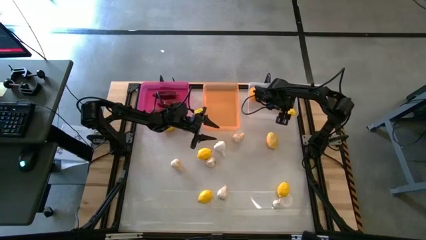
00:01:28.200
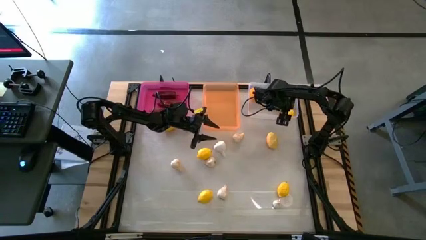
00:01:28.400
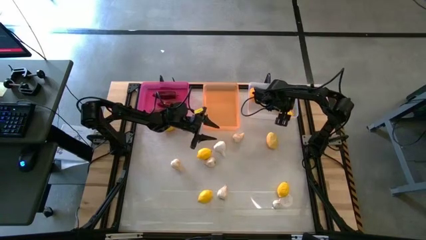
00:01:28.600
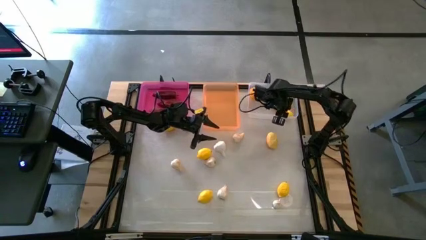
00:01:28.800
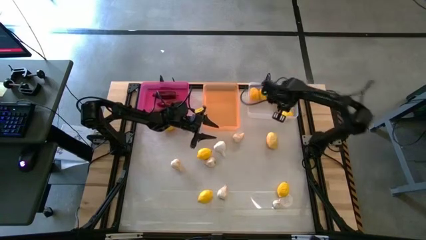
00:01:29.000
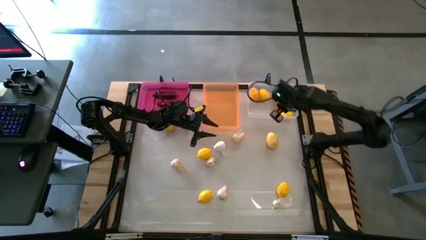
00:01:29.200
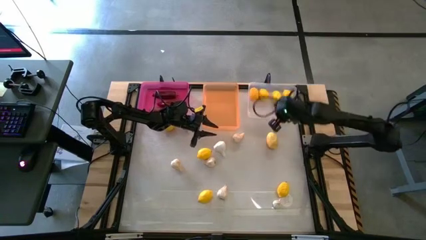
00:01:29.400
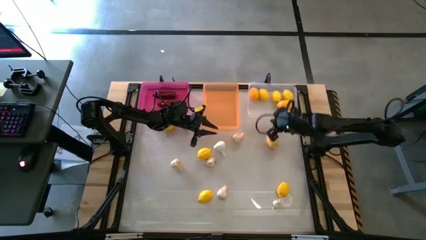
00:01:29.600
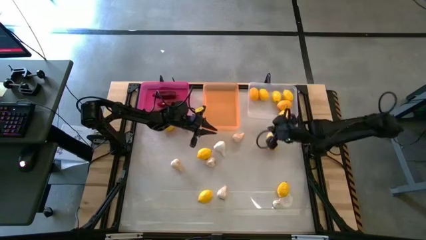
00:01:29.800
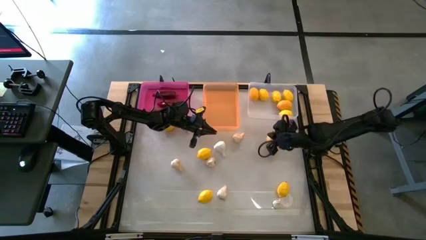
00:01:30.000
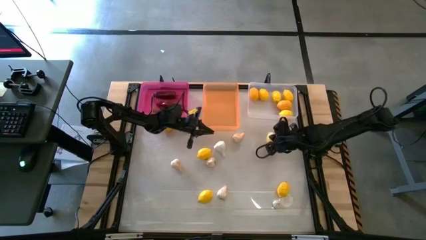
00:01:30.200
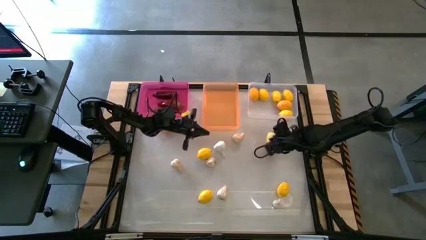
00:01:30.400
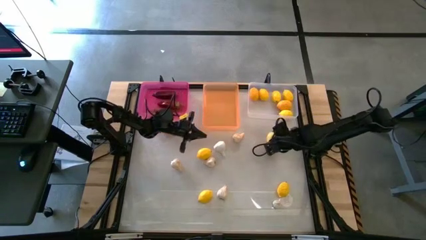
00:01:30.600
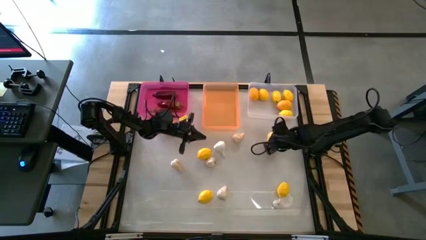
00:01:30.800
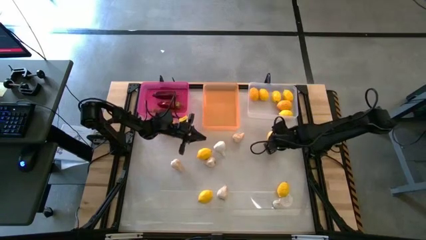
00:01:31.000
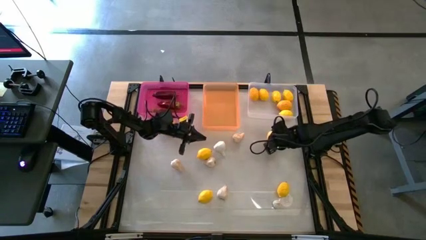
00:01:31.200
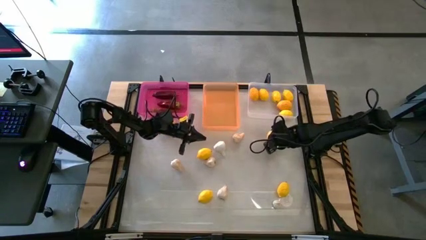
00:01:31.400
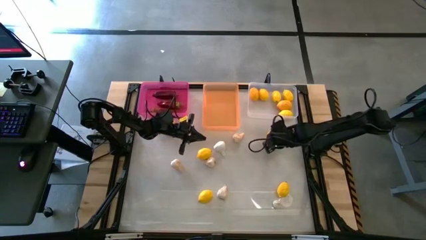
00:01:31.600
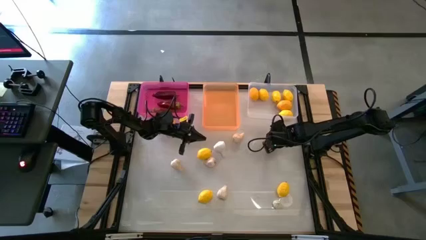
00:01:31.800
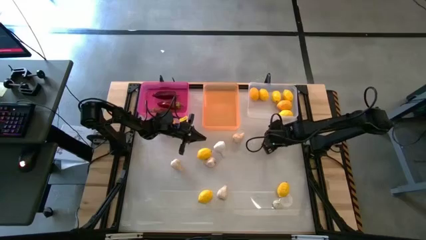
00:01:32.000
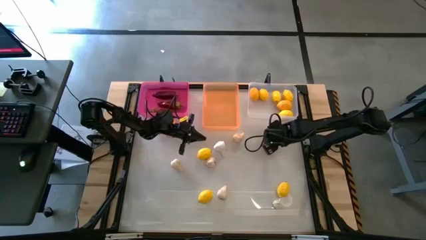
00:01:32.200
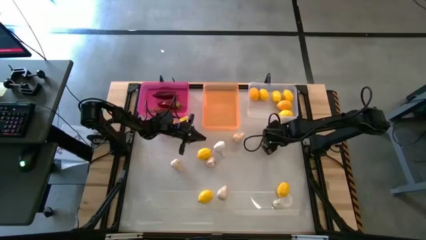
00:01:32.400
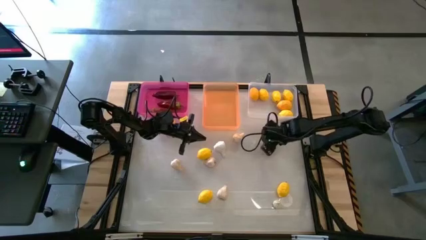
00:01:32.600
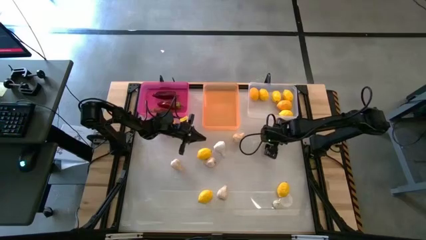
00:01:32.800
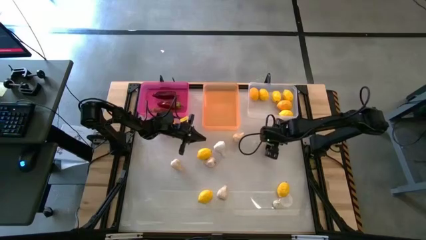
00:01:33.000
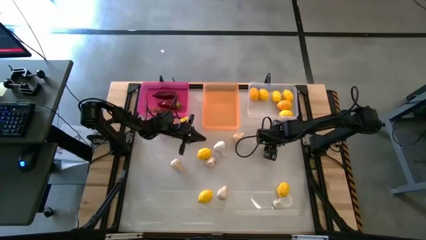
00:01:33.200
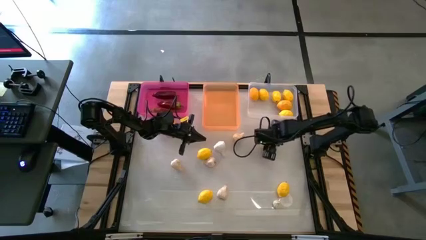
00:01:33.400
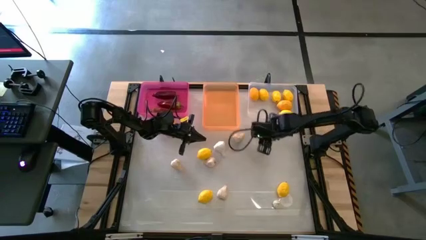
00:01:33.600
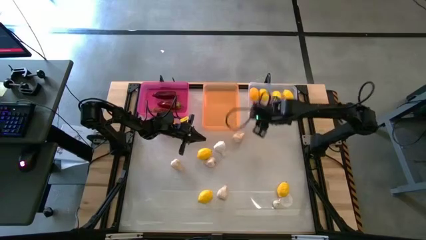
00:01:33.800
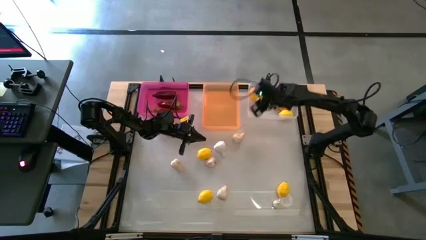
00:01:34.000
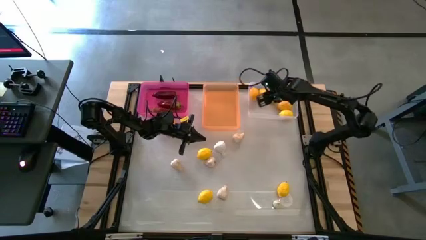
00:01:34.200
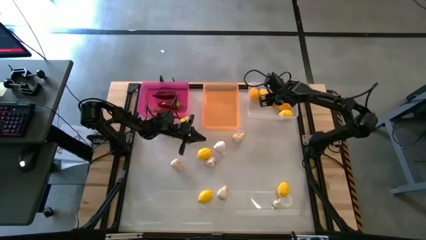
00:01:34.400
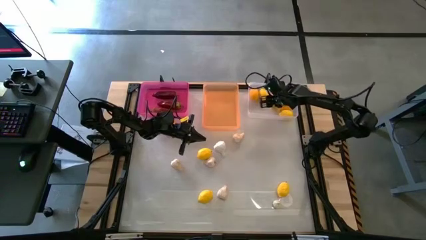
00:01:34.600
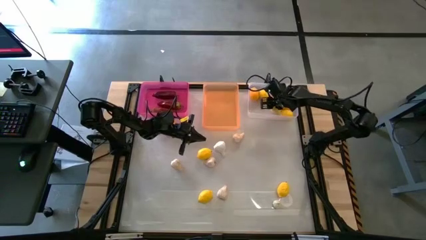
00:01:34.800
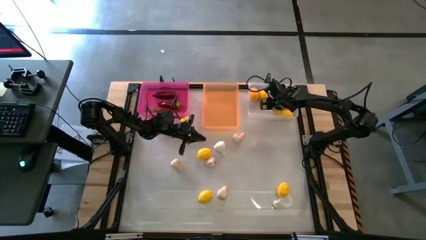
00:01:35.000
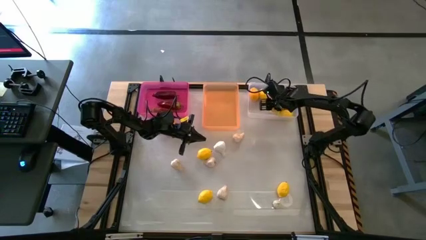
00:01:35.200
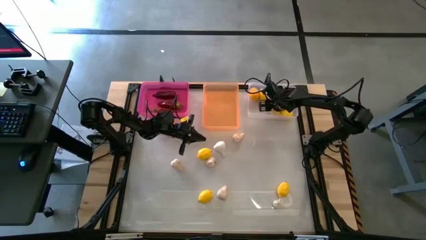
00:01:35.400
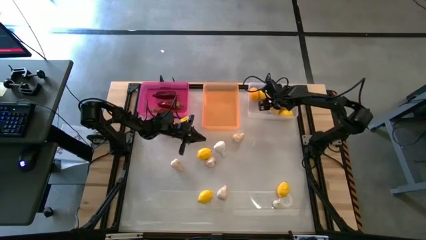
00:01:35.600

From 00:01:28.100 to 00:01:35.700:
Task: Sort produce into baskets
Put the yellow lemon into the transparent bin

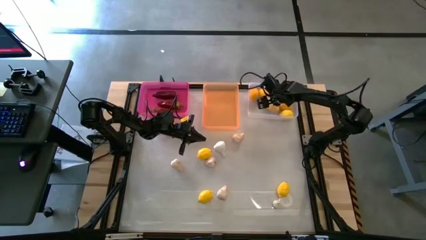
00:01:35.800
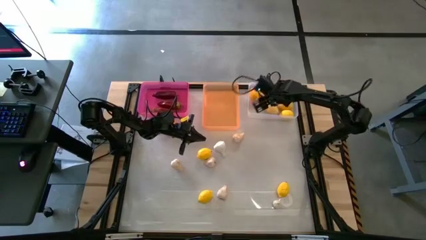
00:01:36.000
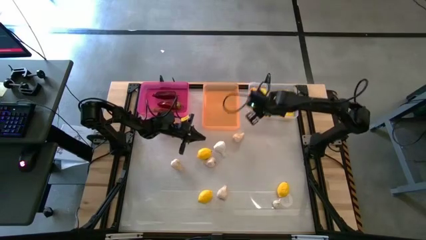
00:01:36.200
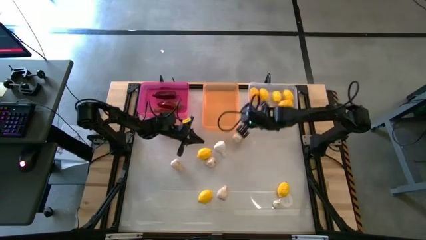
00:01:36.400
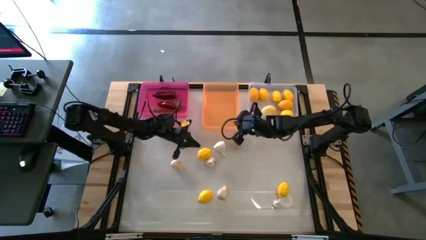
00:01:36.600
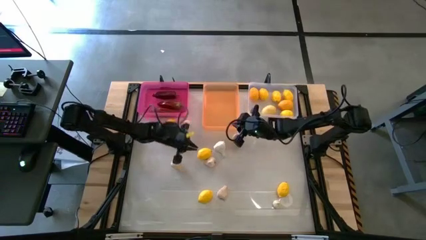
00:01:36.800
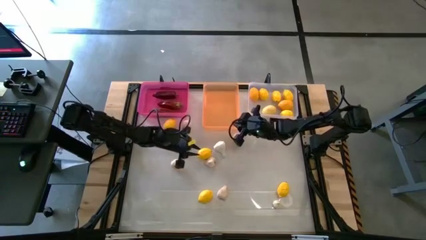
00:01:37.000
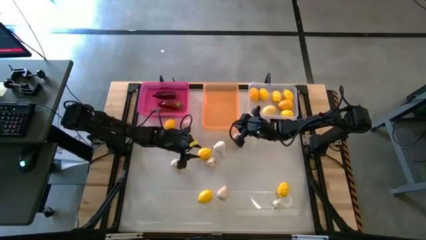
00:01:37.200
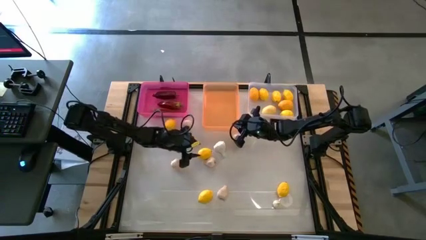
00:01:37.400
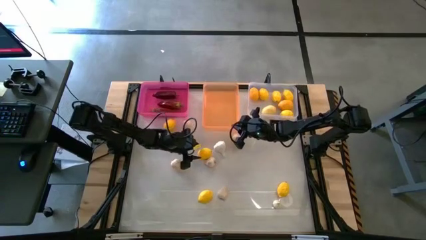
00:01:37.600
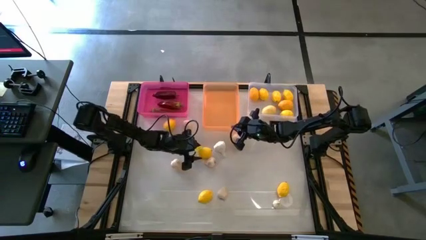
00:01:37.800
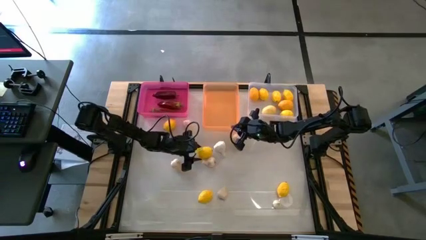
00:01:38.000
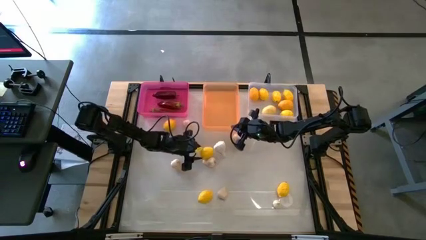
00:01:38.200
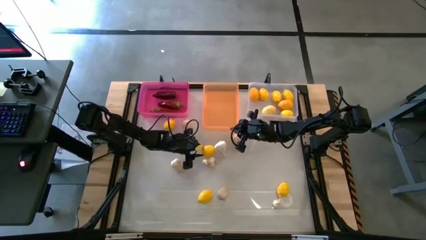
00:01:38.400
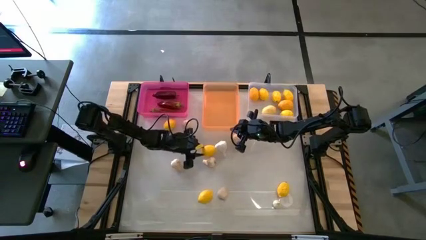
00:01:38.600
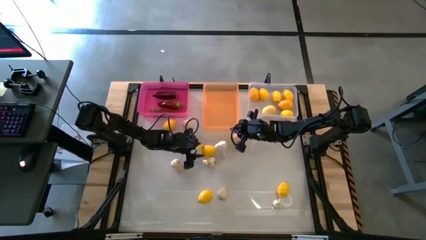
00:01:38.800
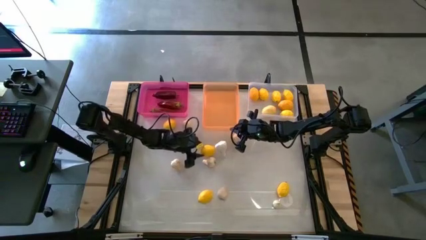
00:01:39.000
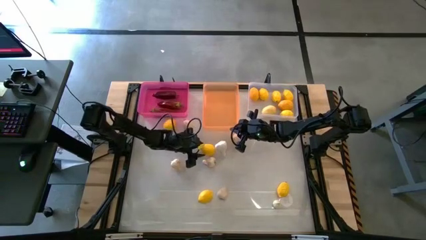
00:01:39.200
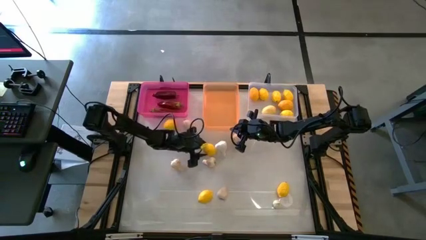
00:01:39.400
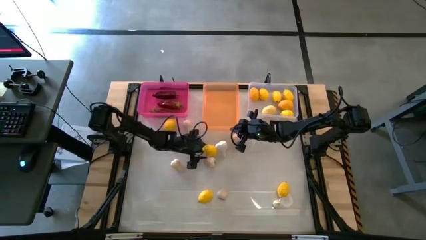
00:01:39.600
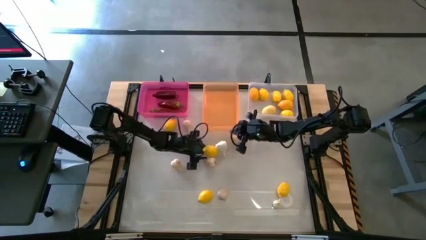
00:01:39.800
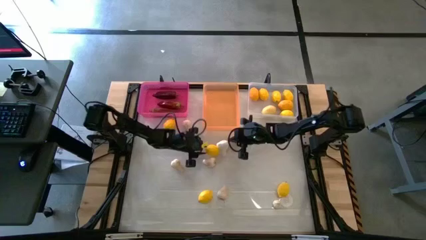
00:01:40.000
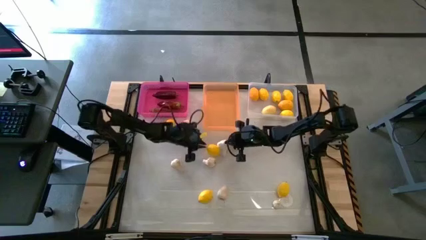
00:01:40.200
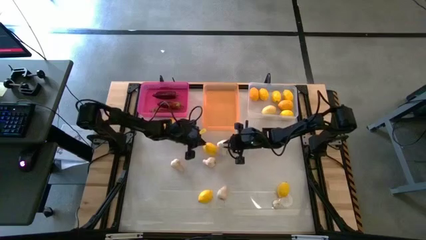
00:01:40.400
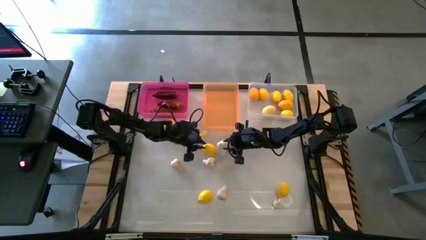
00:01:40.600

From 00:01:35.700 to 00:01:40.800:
Put the yellow lemon into the transparent bin

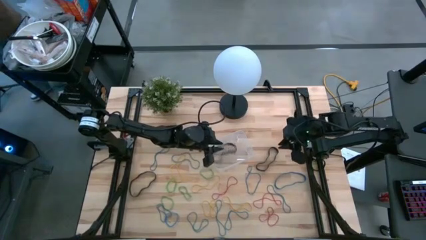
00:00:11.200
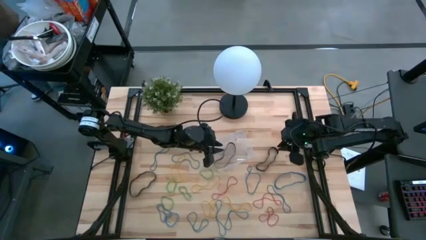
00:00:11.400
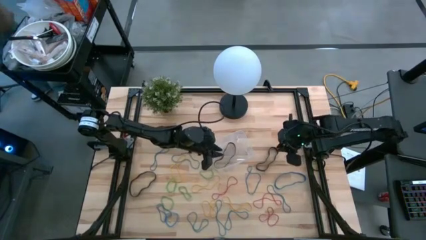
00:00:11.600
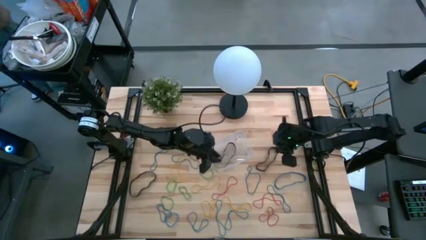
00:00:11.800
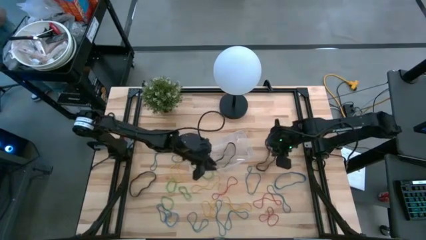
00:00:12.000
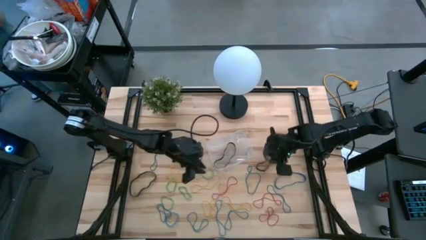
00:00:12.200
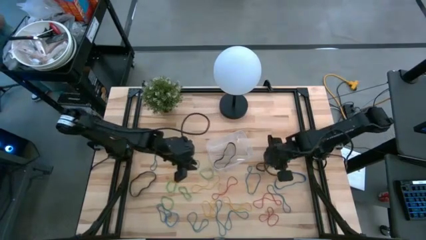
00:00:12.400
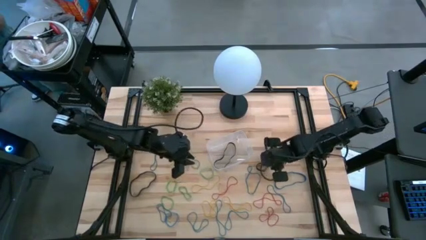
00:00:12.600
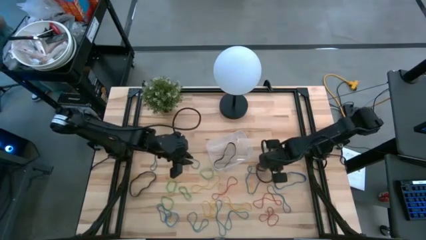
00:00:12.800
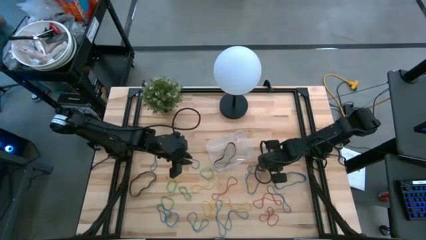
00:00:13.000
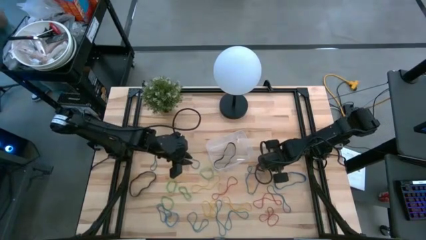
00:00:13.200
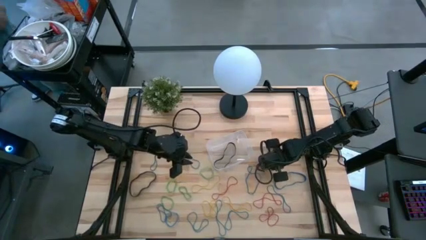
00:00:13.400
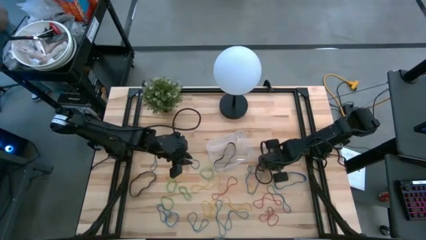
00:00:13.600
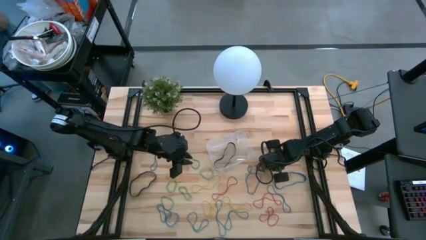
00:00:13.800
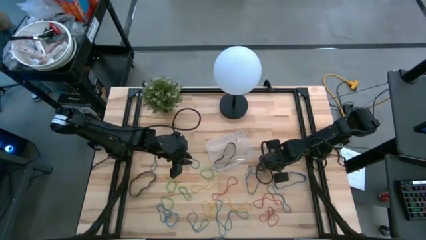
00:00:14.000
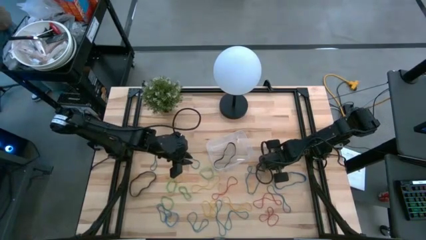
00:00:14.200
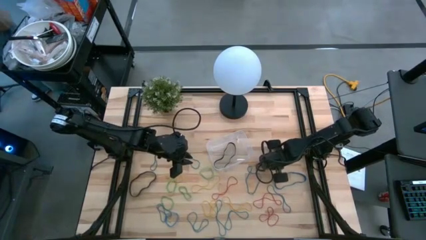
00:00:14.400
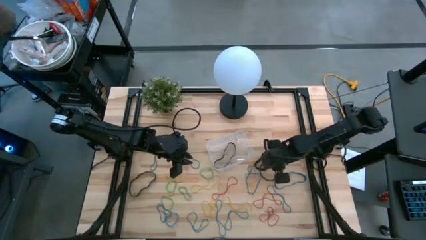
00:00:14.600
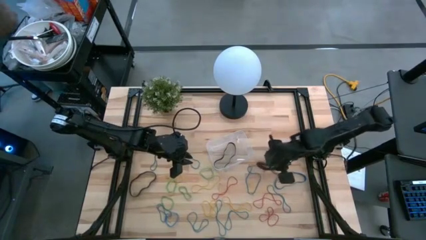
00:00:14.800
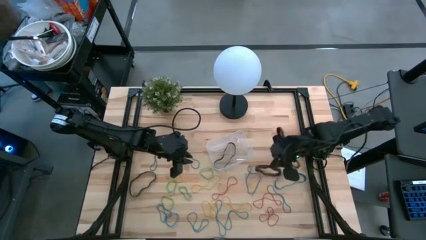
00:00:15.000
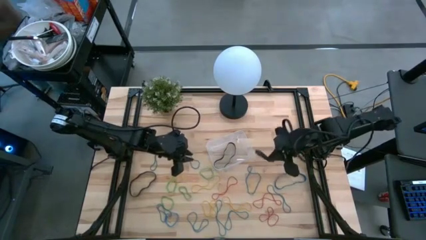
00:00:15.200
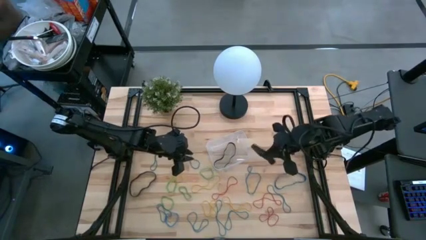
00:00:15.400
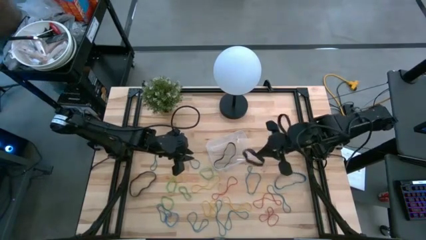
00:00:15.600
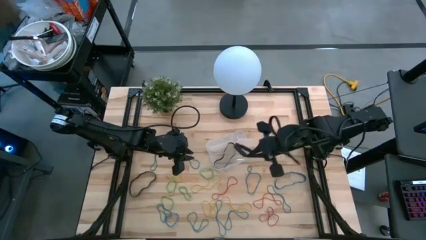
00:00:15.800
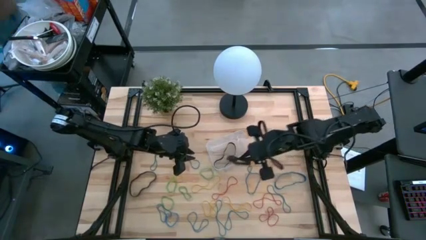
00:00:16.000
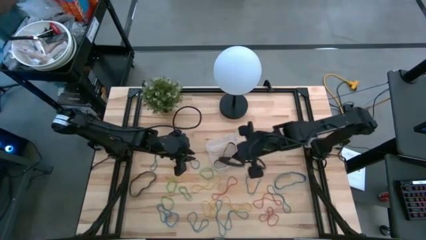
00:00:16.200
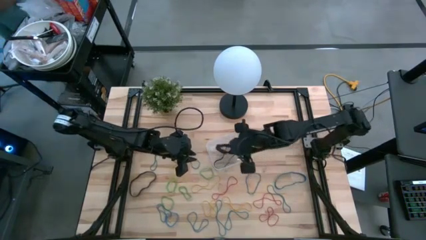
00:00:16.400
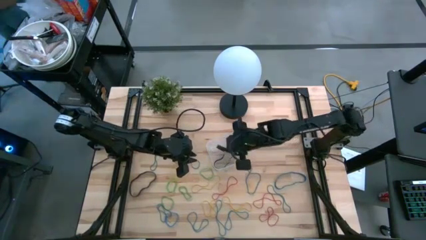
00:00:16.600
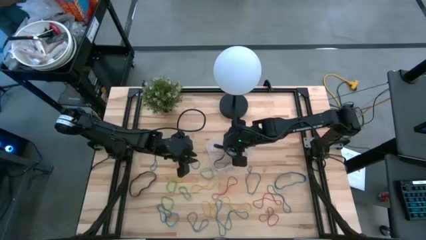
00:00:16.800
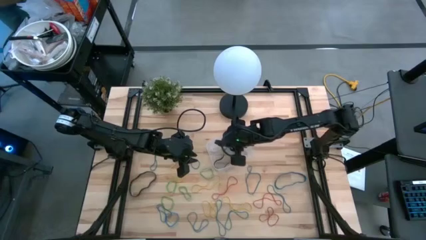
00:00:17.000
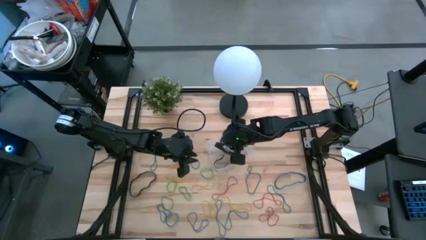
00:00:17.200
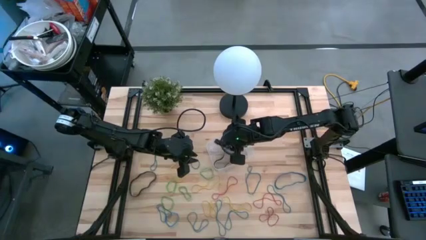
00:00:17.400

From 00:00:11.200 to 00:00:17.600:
Task: Pick and place rubber bands into bin
Put the black rubber band into the transparent bin
